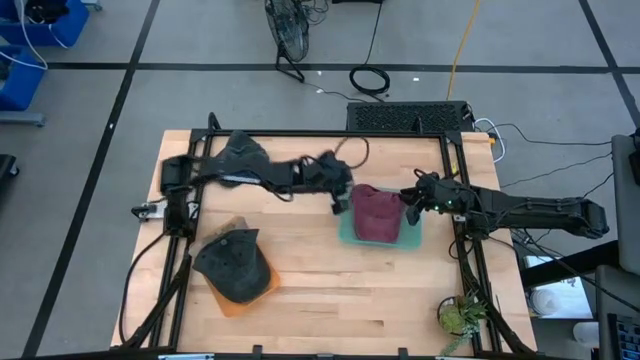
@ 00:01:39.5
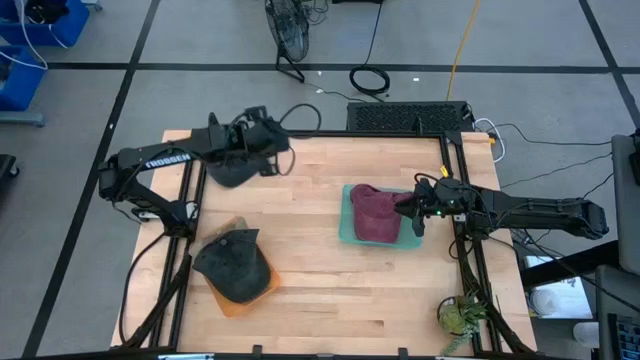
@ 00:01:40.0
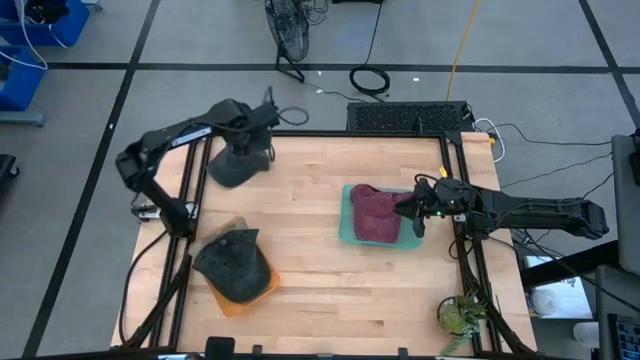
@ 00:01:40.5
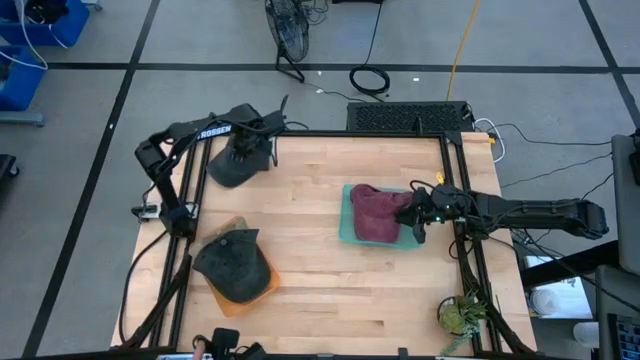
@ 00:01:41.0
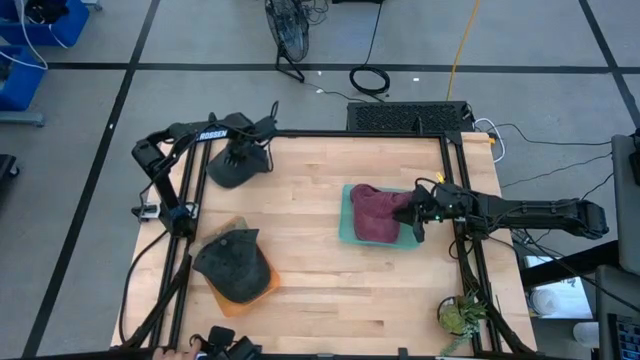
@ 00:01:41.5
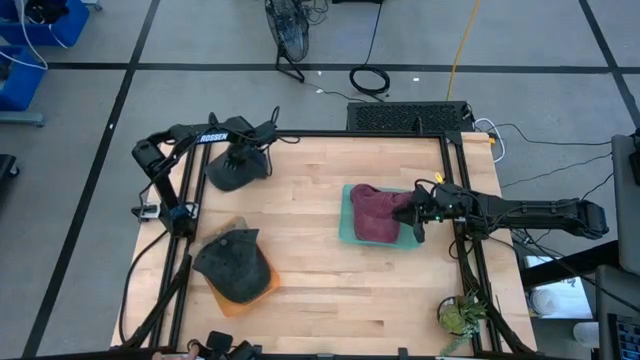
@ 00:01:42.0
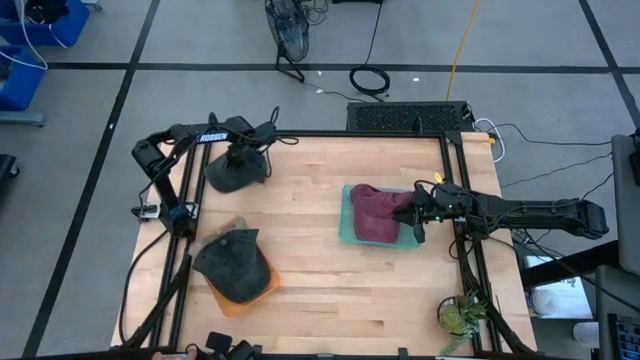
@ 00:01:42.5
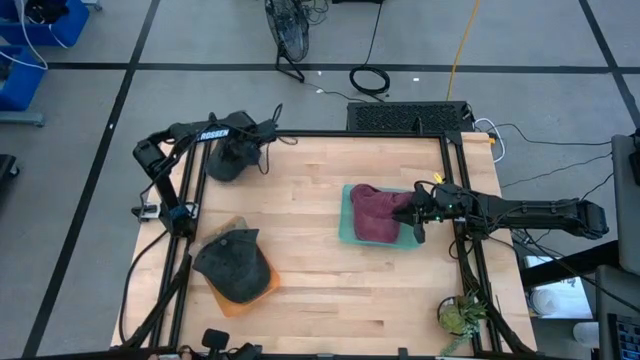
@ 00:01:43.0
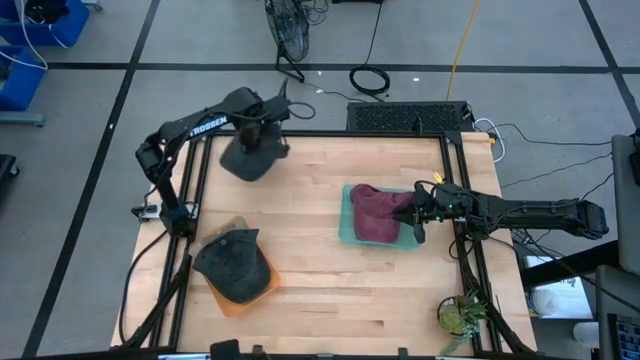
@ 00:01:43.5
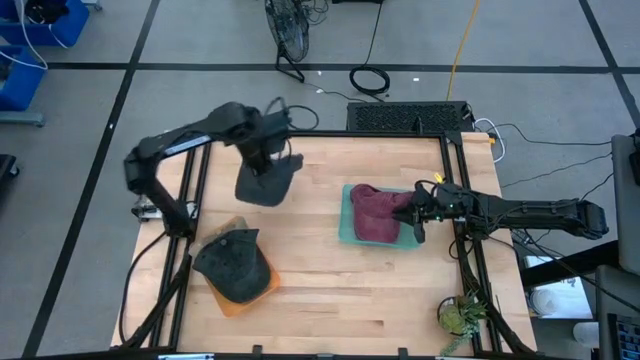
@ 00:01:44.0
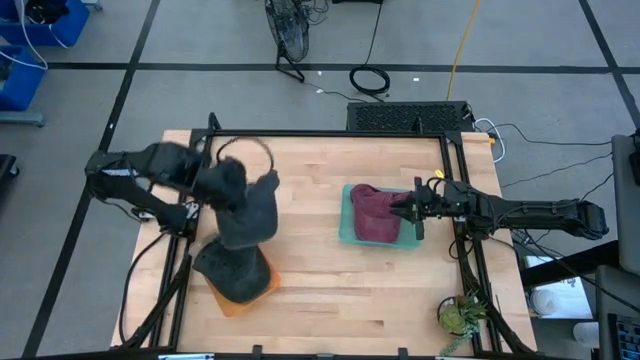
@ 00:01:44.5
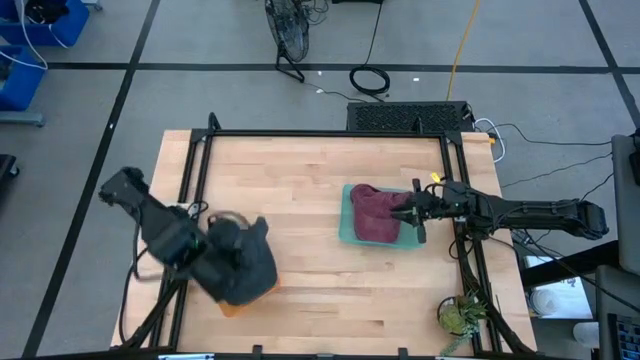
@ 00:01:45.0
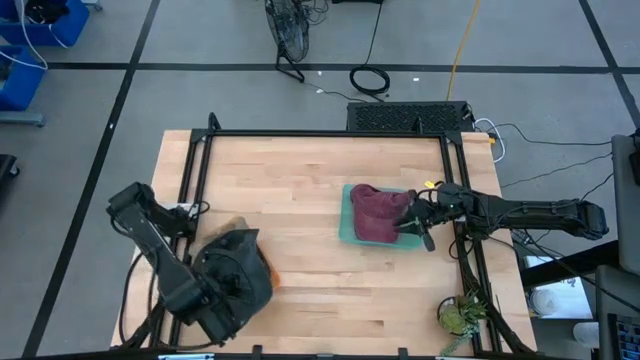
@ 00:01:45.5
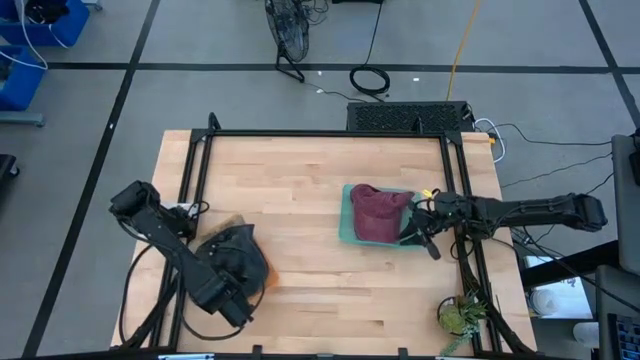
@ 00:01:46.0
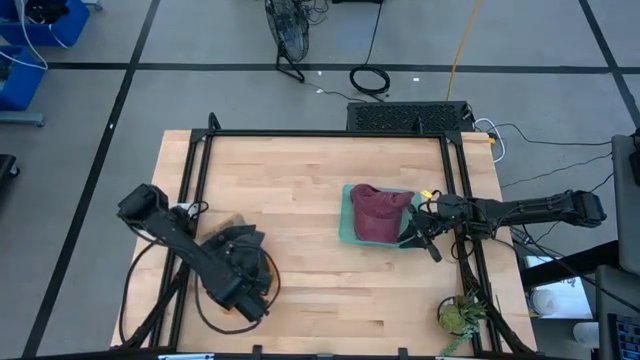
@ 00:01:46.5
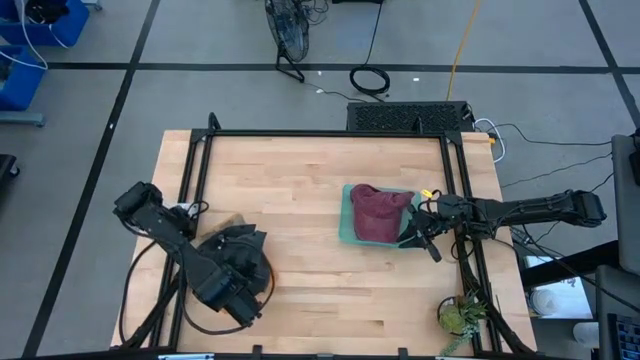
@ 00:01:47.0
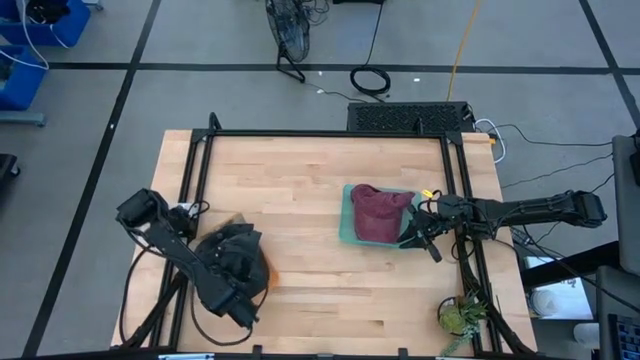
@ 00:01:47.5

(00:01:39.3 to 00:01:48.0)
Task: Pick & Place hat
Put the black cap into the orange bin

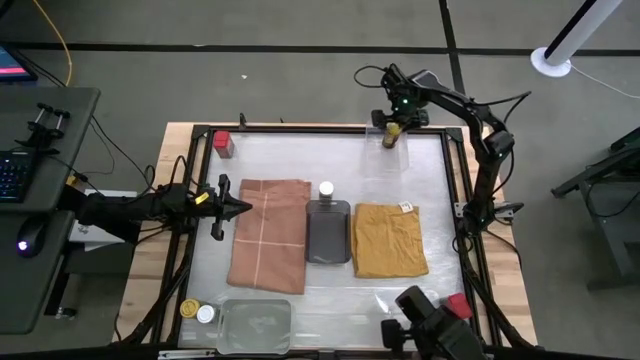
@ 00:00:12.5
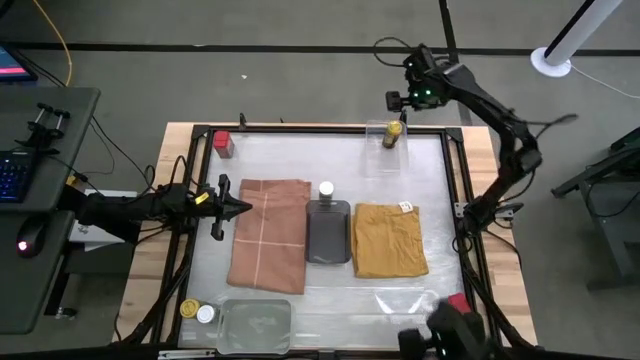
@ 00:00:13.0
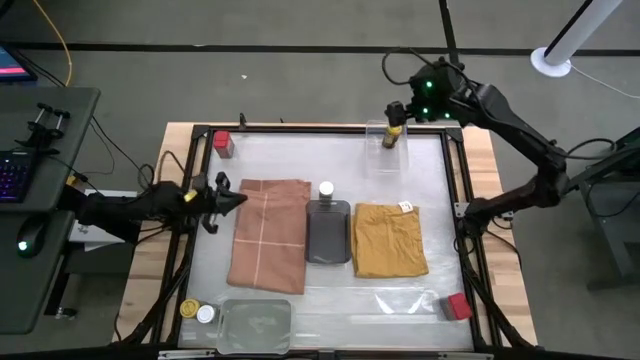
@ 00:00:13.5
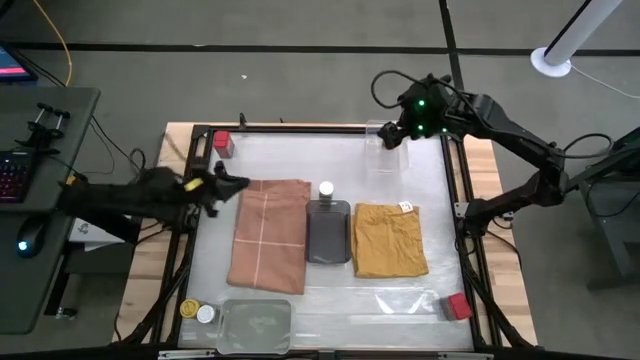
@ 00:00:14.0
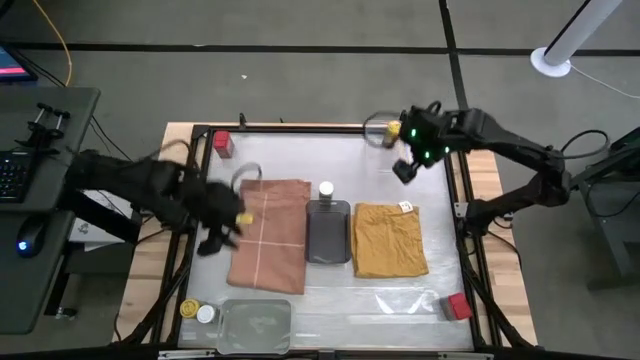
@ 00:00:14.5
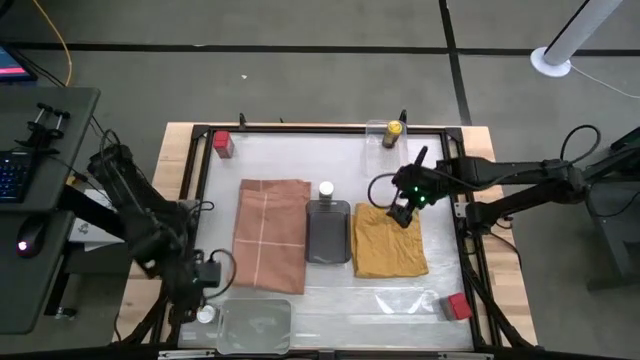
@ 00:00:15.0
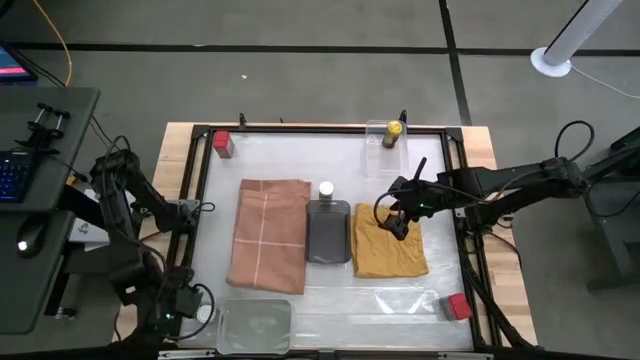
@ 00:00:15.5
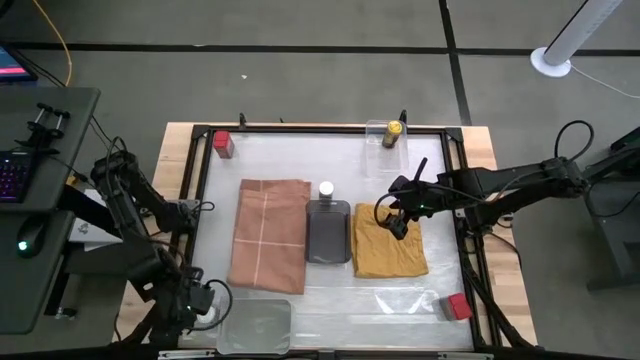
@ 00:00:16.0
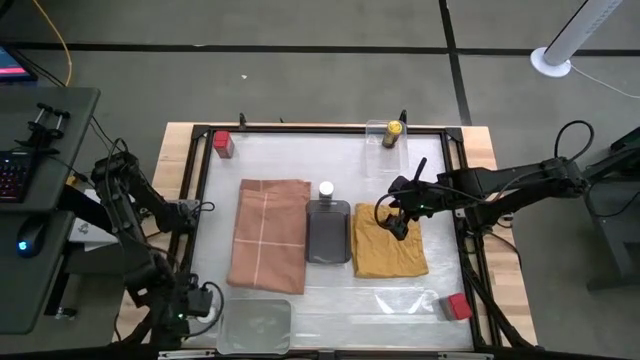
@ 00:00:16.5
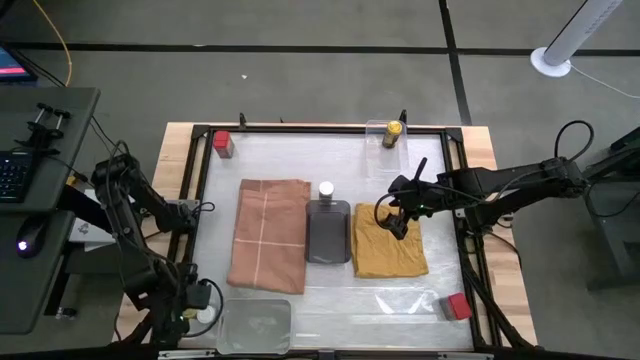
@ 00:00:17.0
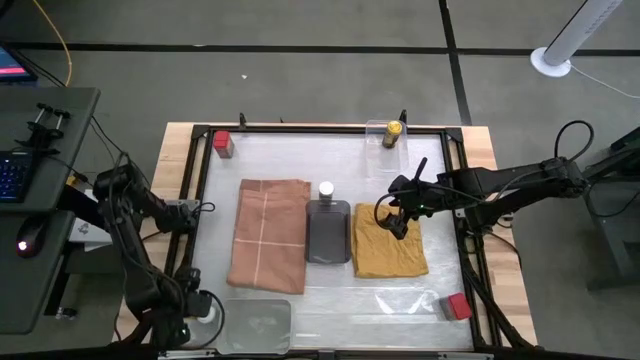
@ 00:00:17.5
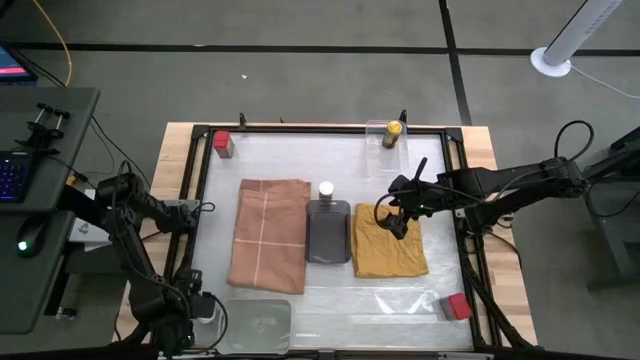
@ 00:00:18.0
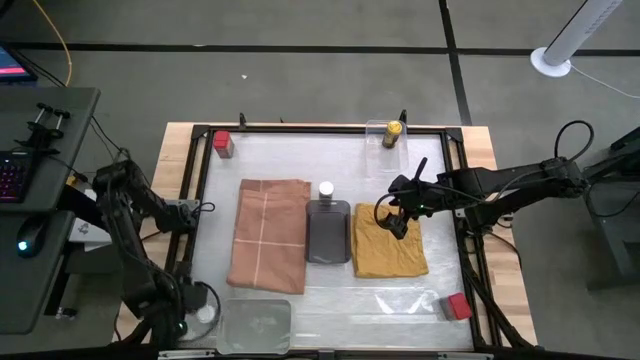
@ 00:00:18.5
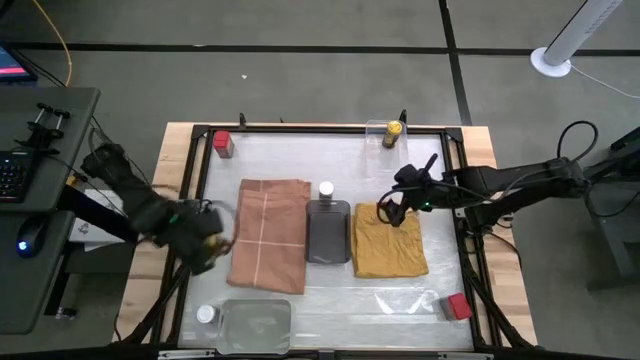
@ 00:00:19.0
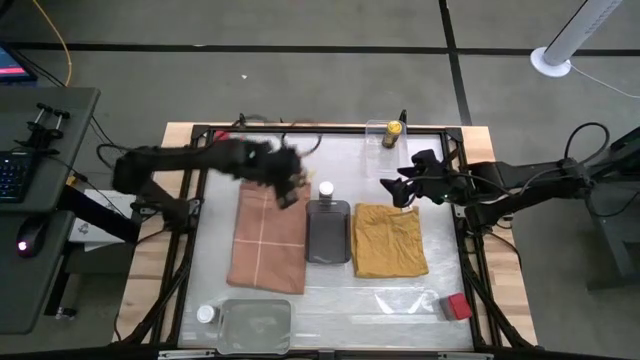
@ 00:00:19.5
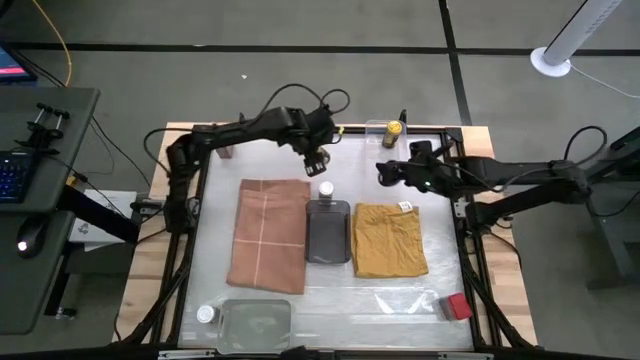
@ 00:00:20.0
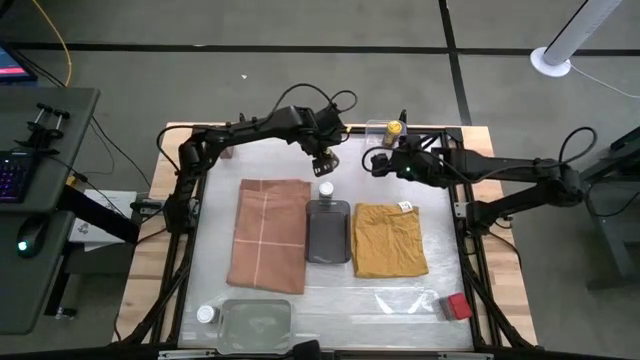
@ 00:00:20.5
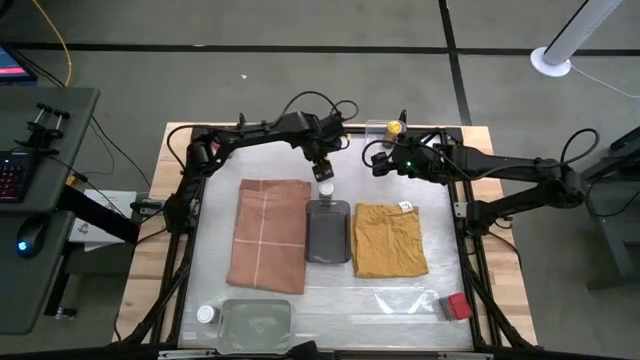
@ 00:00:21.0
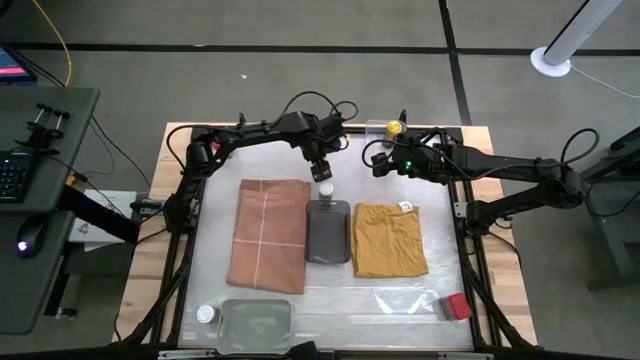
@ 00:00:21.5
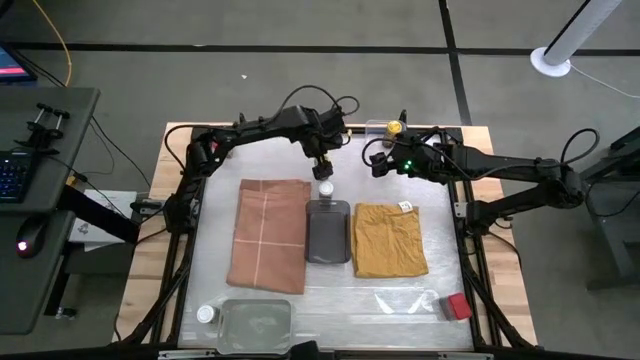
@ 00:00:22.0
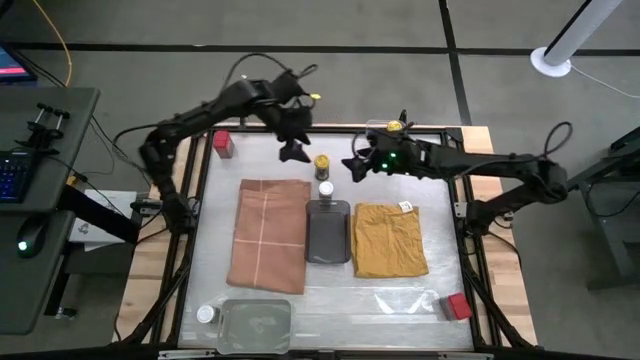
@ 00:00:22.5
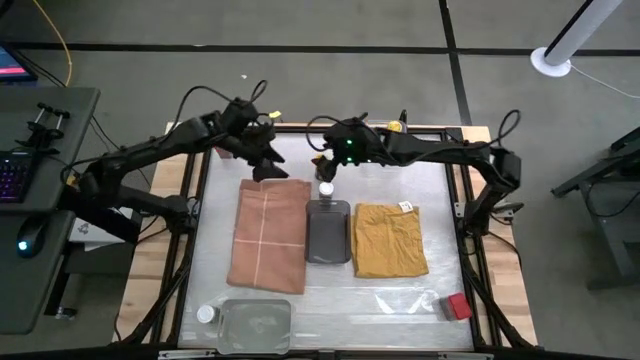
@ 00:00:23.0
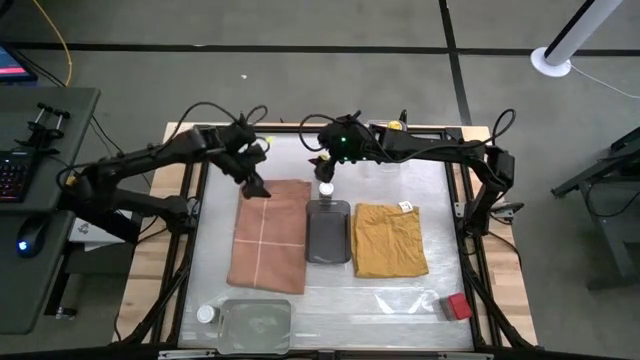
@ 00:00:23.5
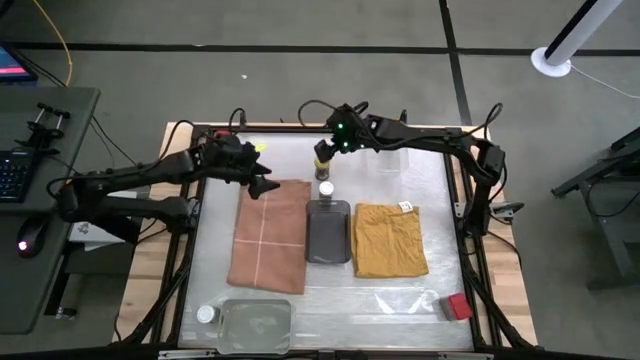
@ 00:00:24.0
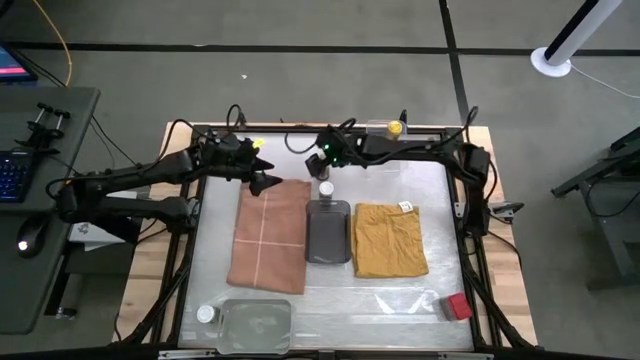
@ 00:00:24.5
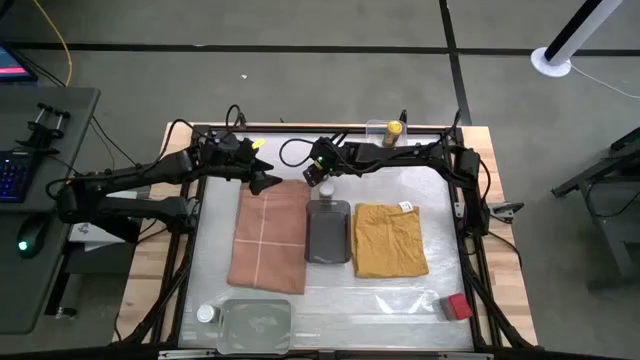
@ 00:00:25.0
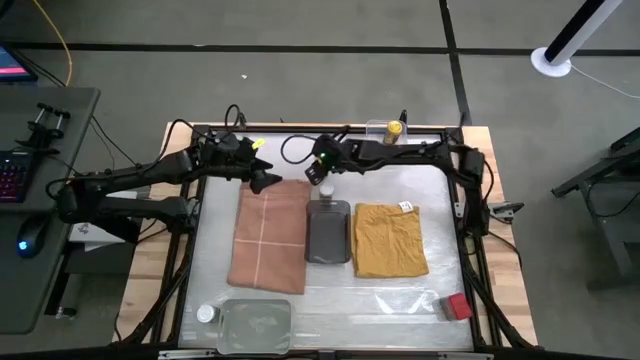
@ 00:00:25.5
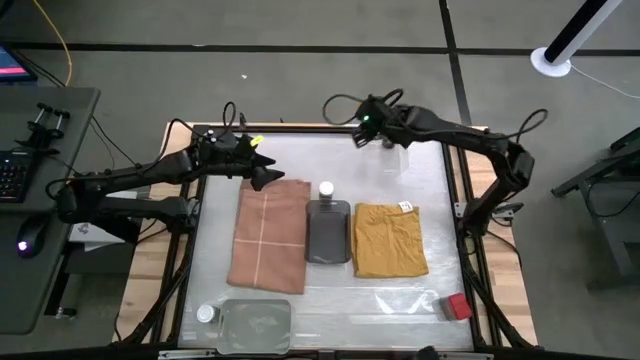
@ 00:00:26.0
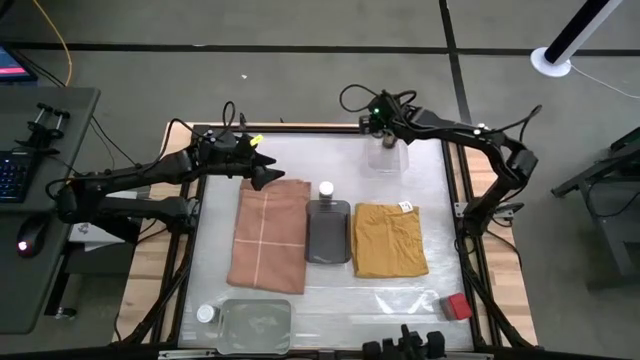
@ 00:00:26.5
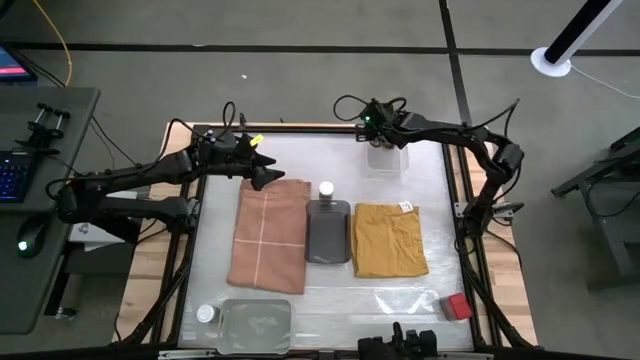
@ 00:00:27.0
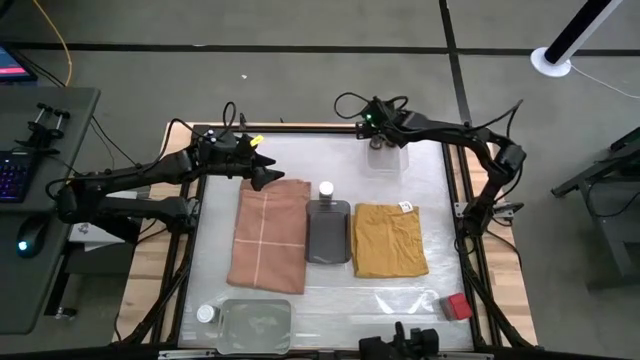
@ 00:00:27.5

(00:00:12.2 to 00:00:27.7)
Task: Sort spices by type
Put the yellow seasoning bottle into the transparent bin
